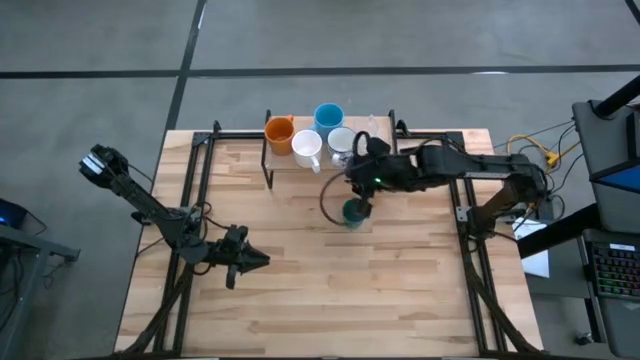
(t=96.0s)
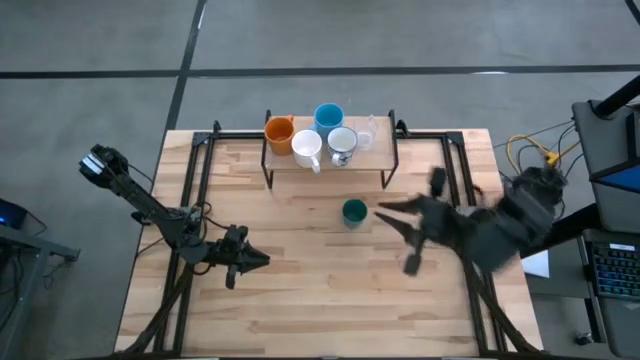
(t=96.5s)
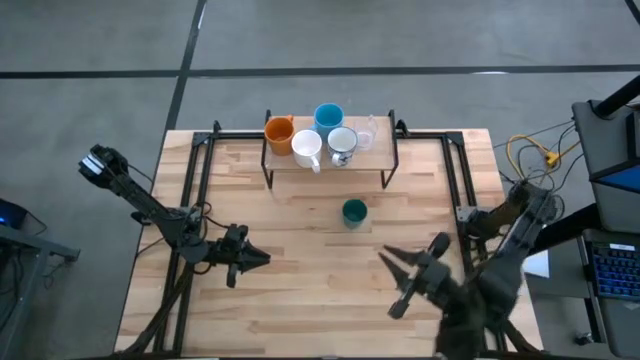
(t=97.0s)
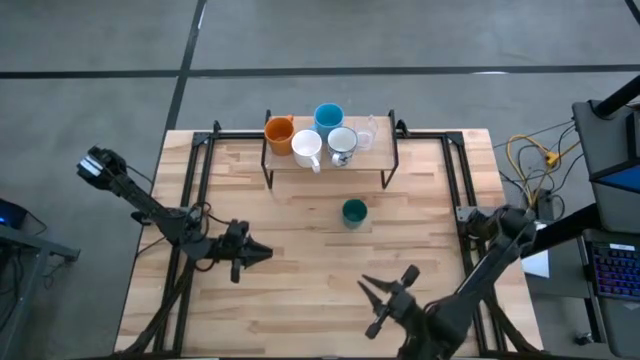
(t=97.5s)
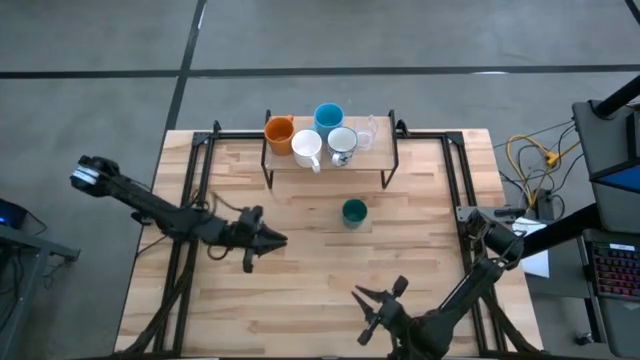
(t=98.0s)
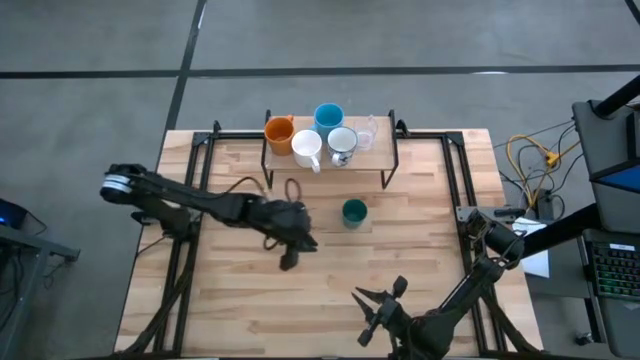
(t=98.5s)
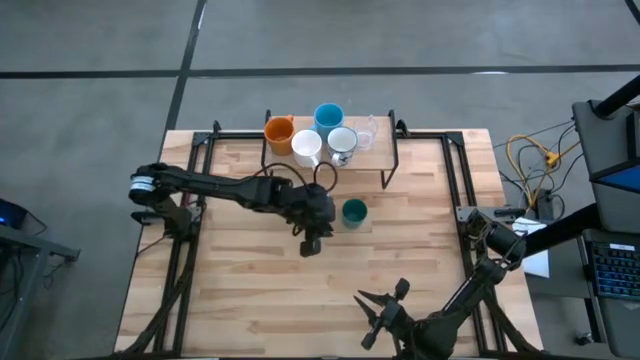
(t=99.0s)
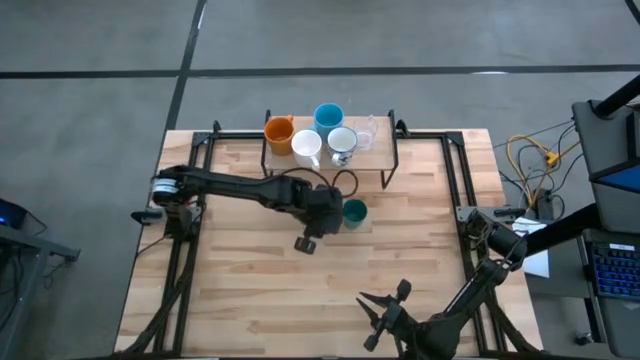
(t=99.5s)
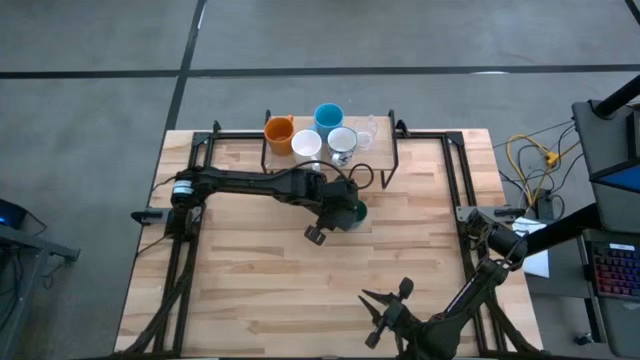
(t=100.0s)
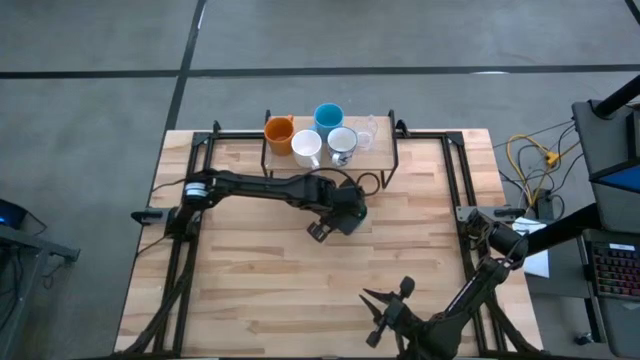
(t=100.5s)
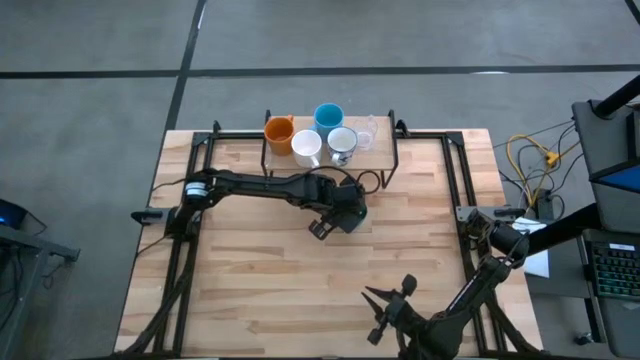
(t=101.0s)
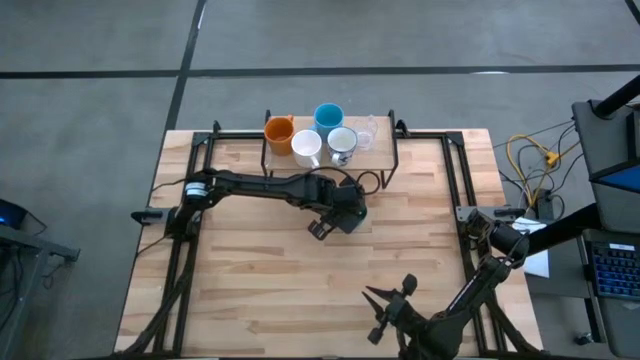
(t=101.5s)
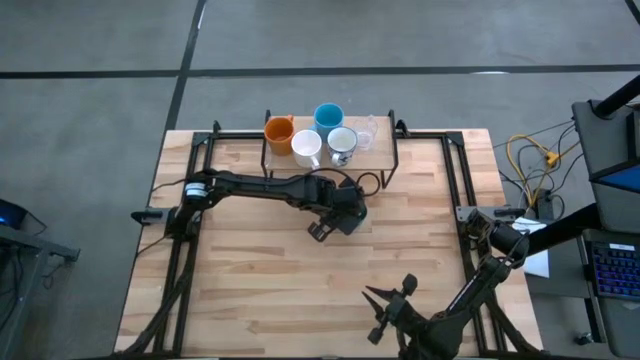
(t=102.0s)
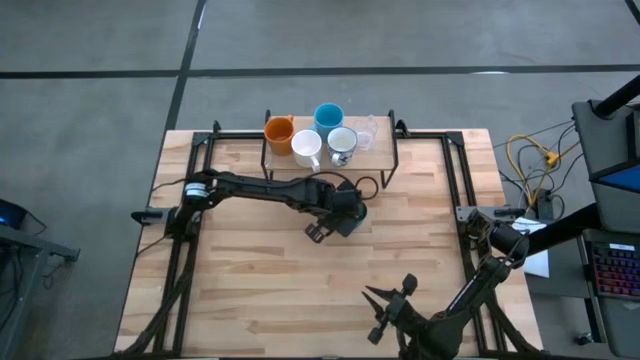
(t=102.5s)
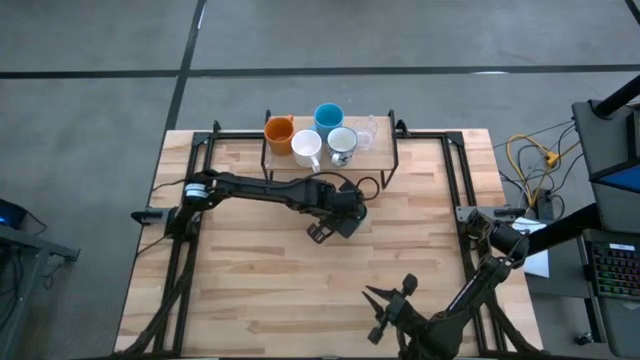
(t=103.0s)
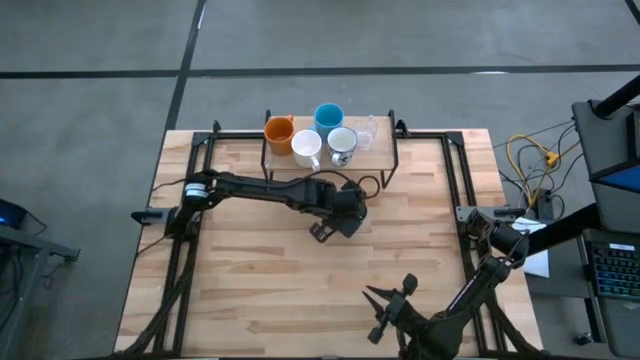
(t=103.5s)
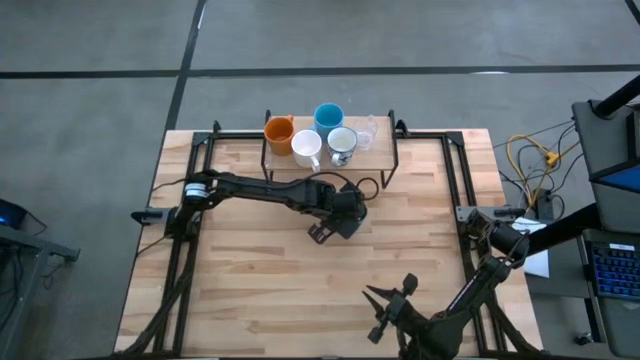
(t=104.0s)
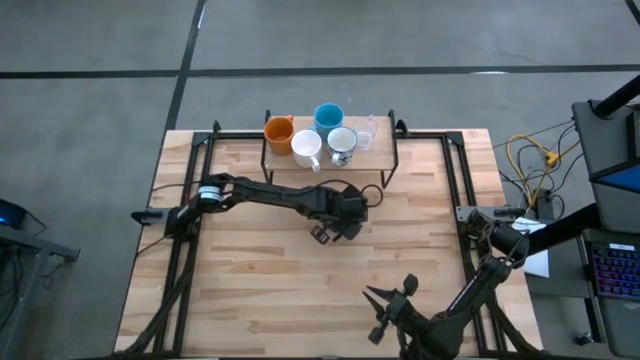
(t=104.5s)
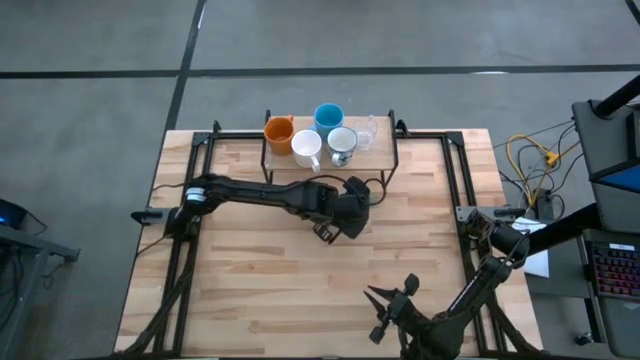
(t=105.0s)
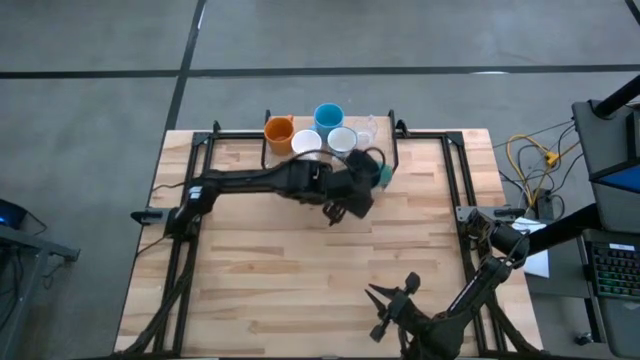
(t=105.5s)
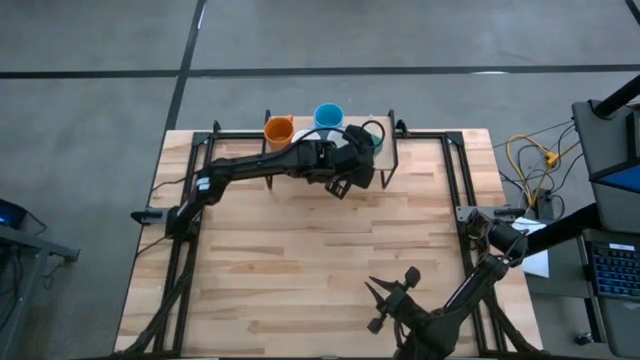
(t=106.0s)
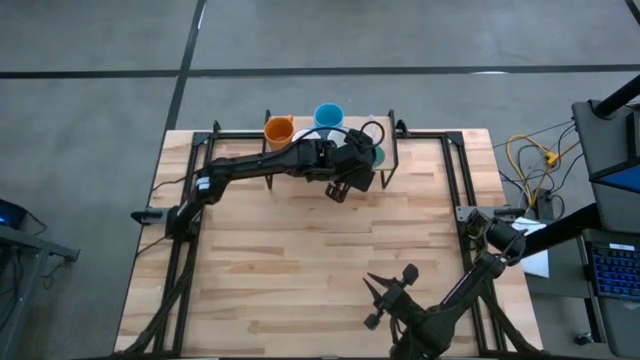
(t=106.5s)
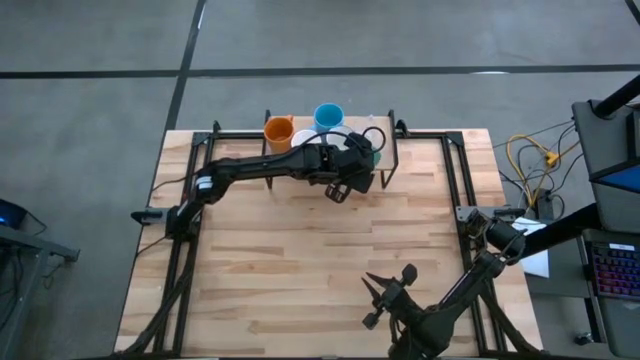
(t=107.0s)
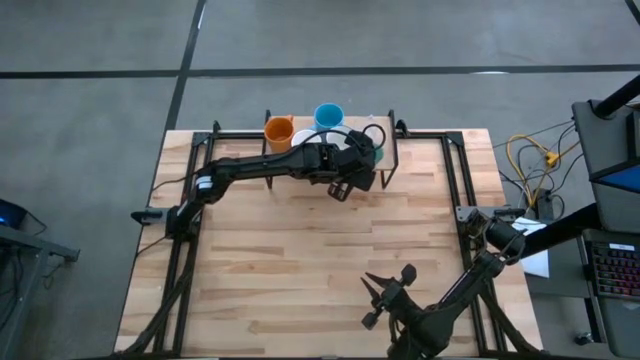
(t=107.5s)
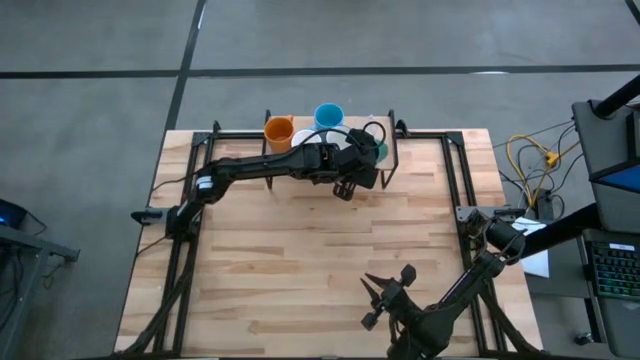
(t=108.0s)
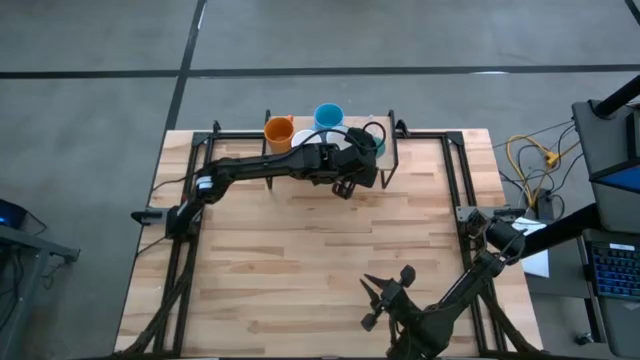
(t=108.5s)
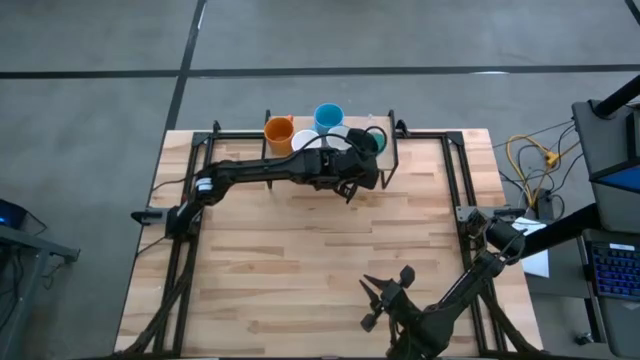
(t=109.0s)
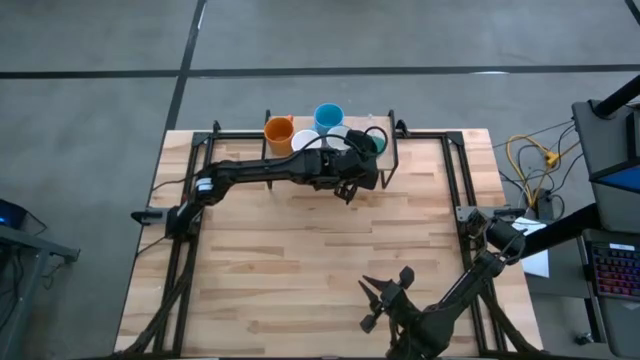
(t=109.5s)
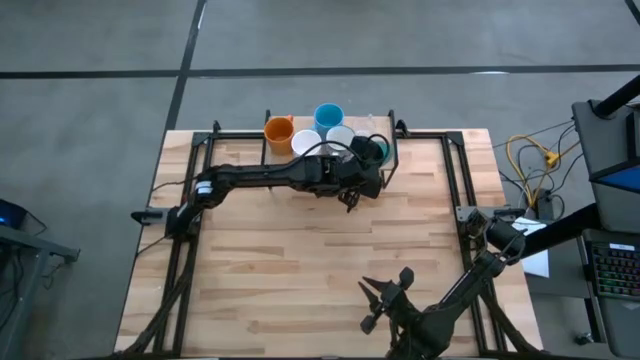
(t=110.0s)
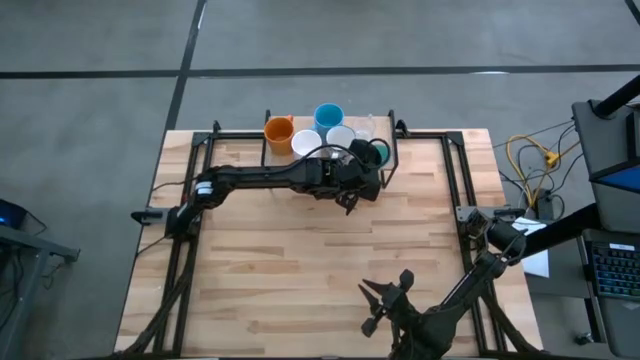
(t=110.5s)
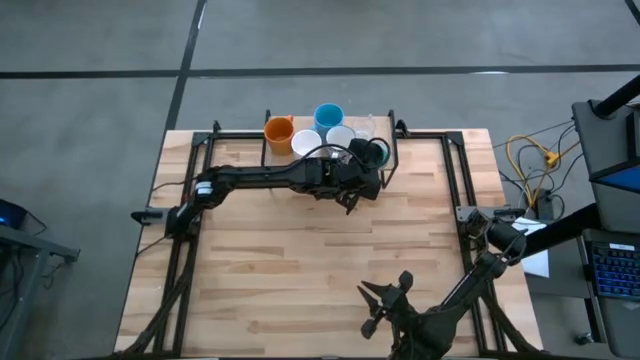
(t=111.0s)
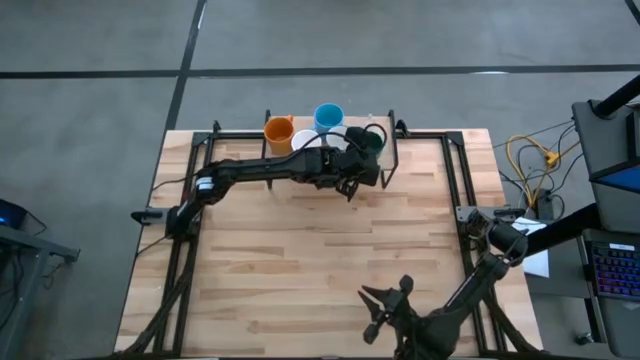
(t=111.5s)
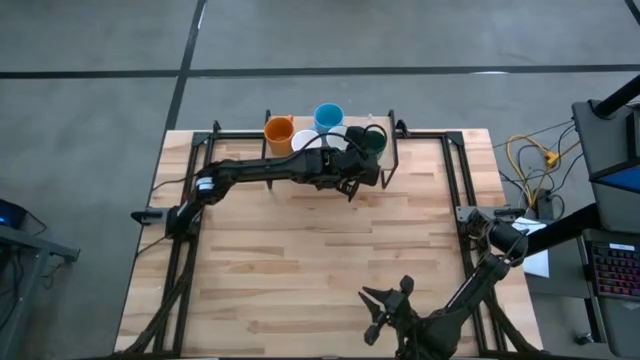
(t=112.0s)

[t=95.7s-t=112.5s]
Task: Stack small to large cups/mugs on shelf
Put the green mug on the shelf
